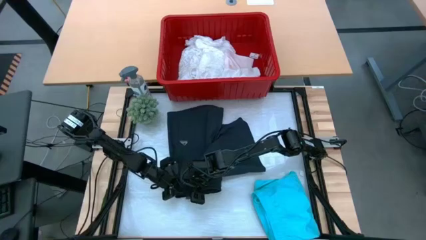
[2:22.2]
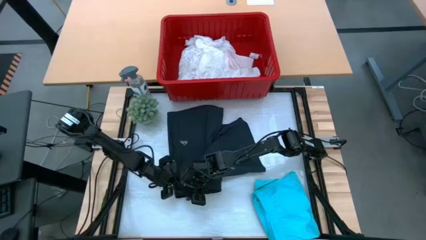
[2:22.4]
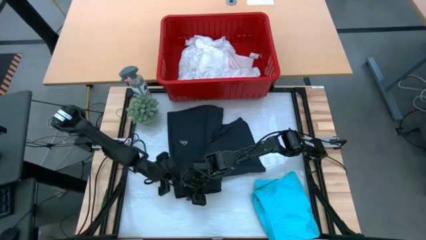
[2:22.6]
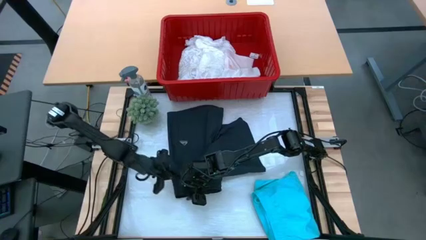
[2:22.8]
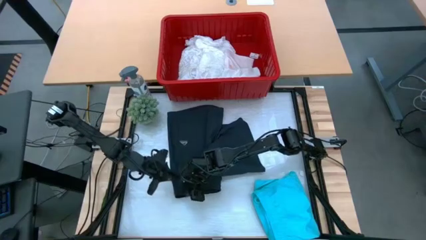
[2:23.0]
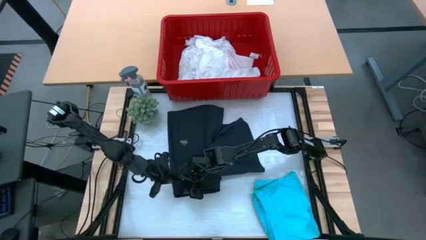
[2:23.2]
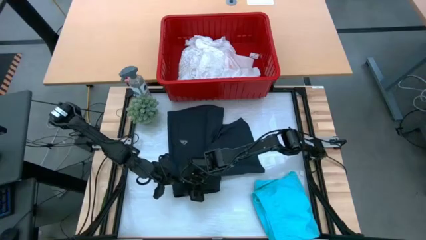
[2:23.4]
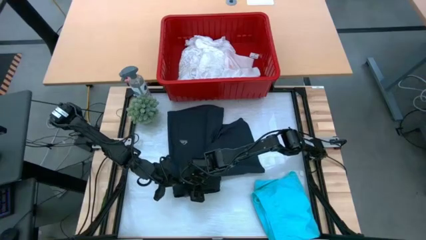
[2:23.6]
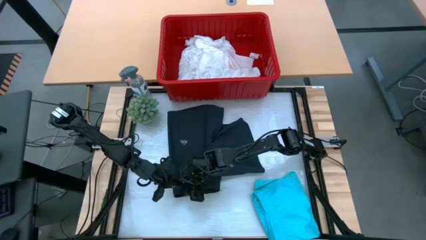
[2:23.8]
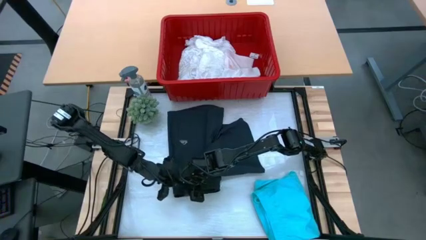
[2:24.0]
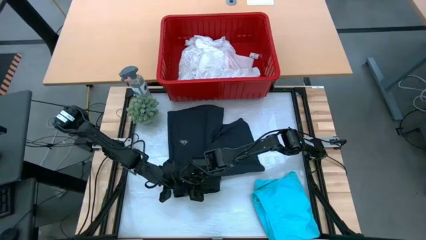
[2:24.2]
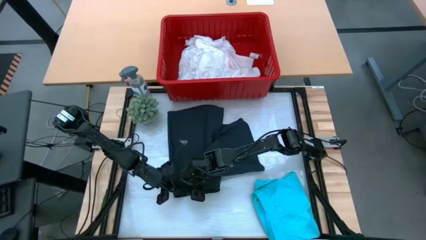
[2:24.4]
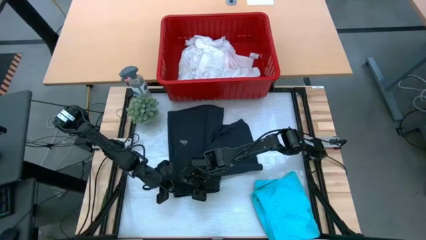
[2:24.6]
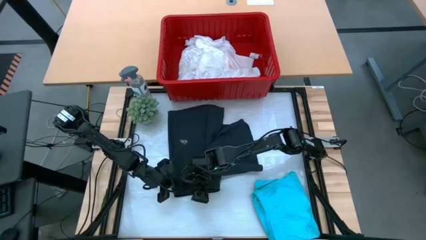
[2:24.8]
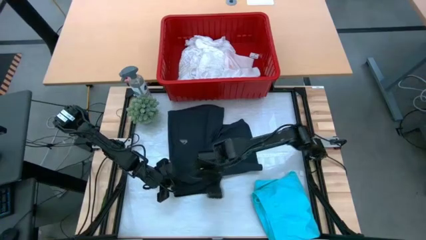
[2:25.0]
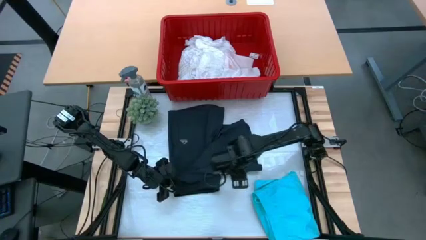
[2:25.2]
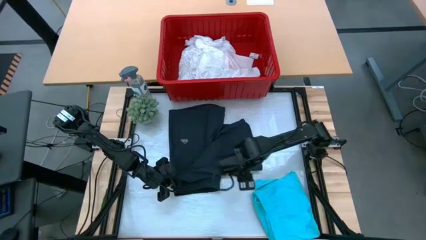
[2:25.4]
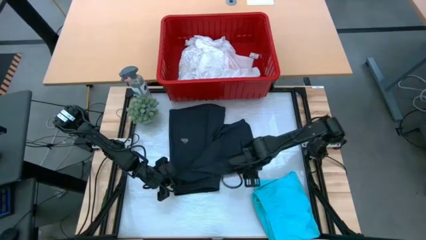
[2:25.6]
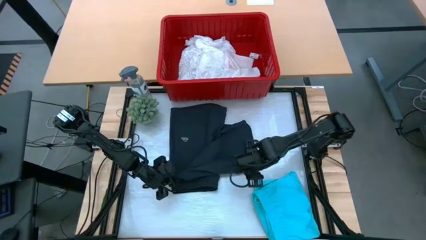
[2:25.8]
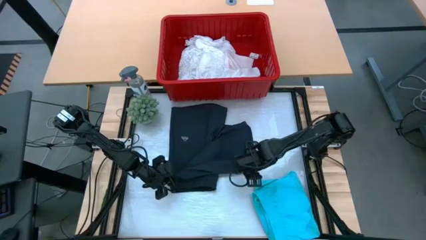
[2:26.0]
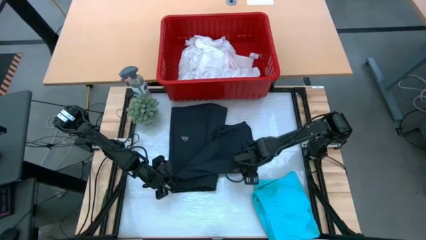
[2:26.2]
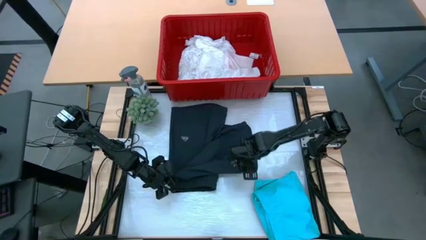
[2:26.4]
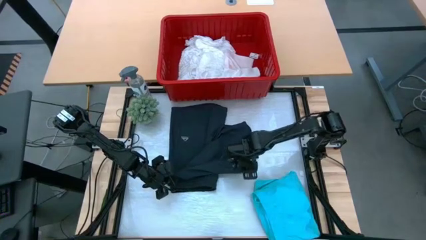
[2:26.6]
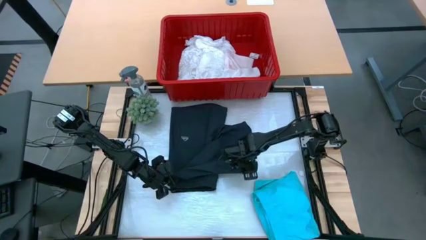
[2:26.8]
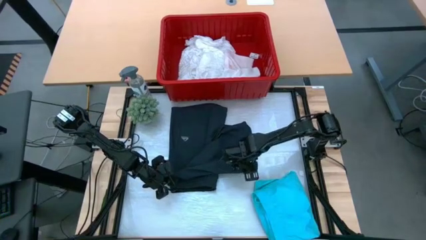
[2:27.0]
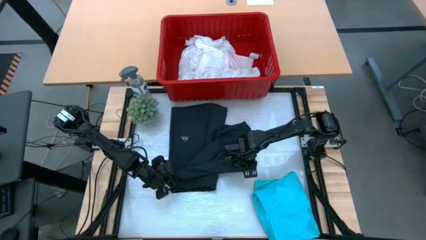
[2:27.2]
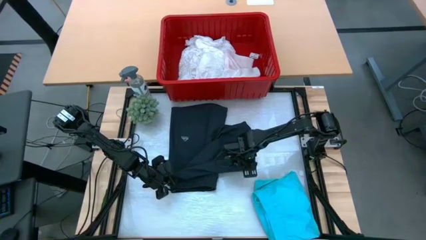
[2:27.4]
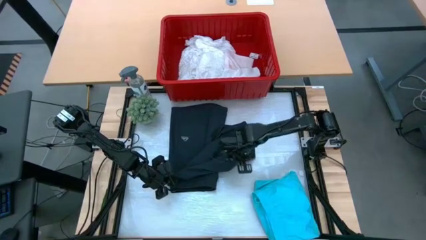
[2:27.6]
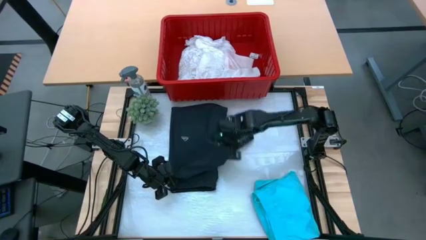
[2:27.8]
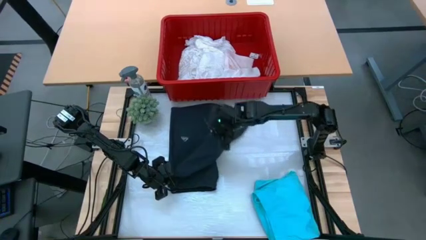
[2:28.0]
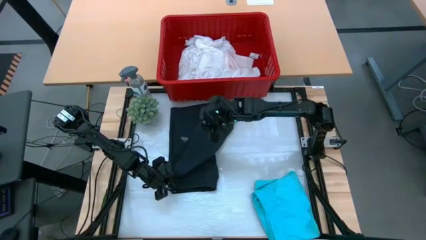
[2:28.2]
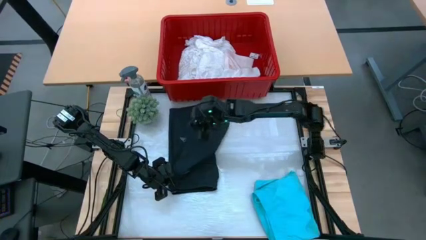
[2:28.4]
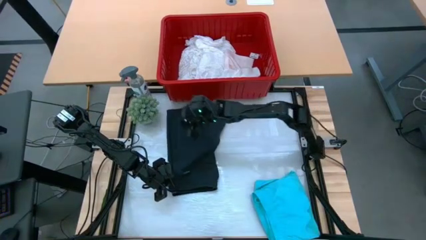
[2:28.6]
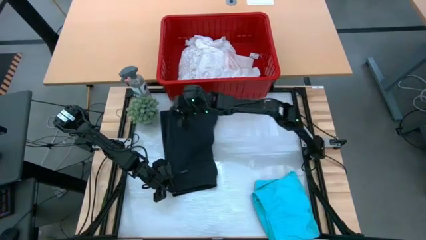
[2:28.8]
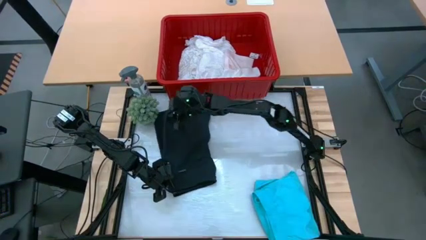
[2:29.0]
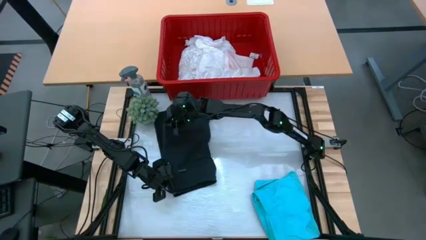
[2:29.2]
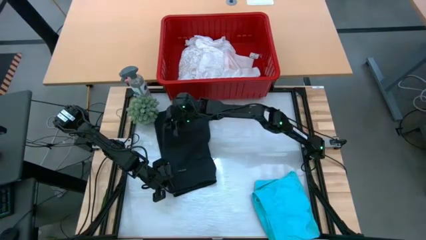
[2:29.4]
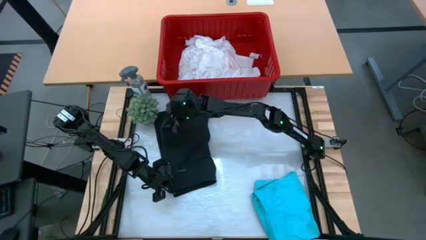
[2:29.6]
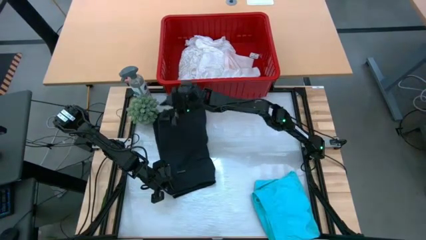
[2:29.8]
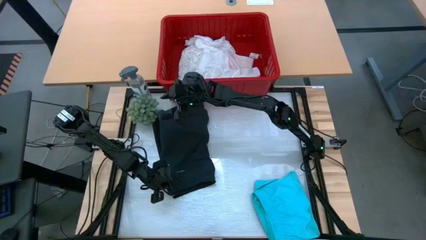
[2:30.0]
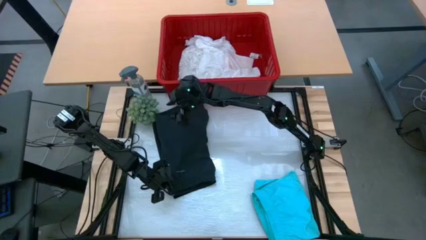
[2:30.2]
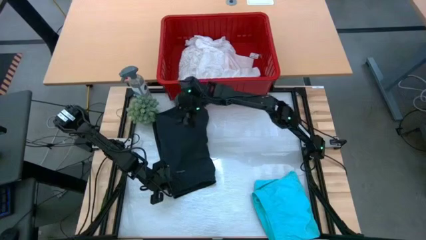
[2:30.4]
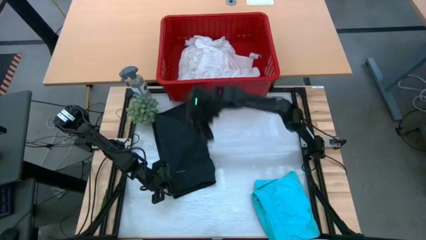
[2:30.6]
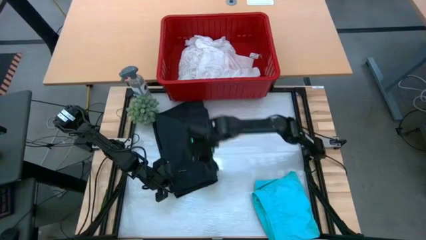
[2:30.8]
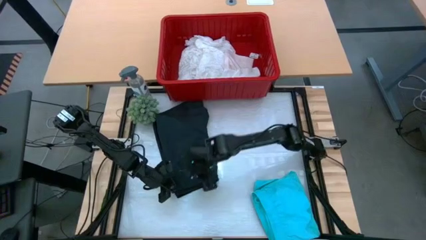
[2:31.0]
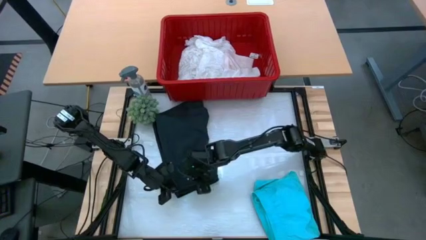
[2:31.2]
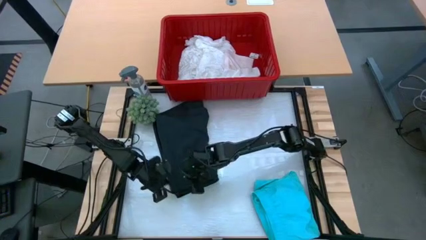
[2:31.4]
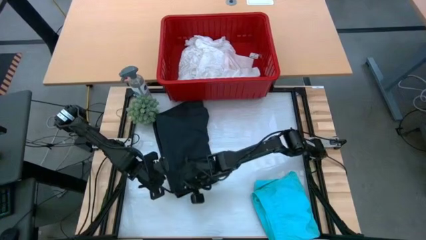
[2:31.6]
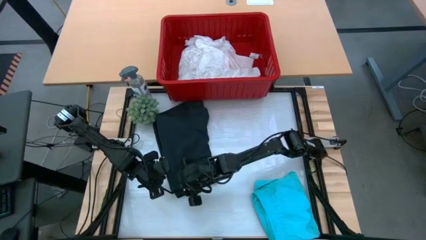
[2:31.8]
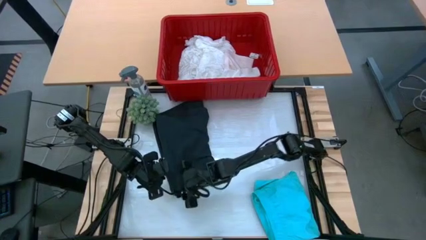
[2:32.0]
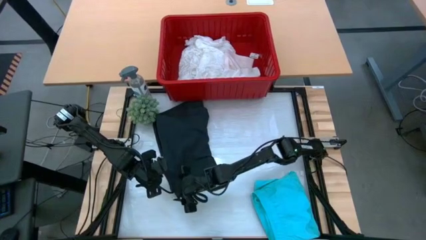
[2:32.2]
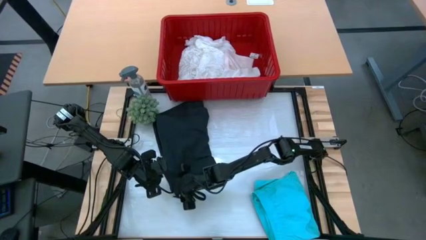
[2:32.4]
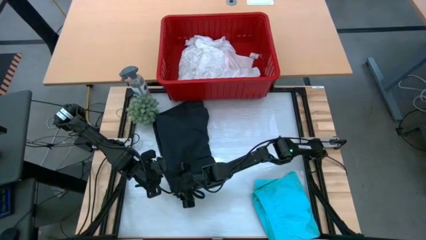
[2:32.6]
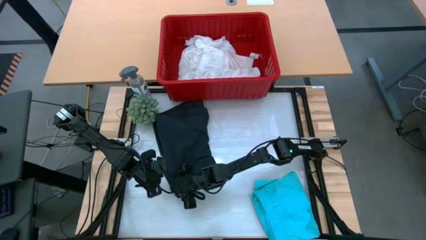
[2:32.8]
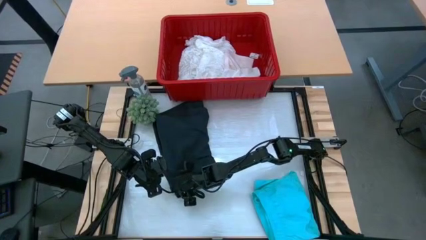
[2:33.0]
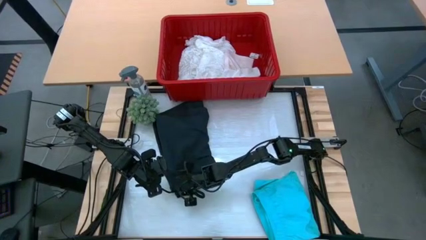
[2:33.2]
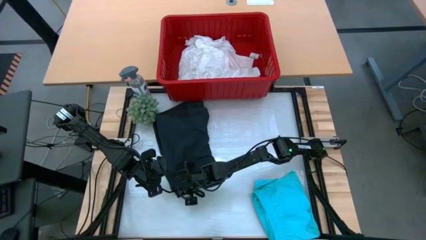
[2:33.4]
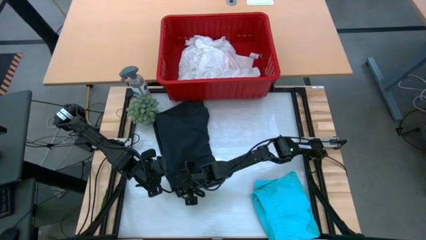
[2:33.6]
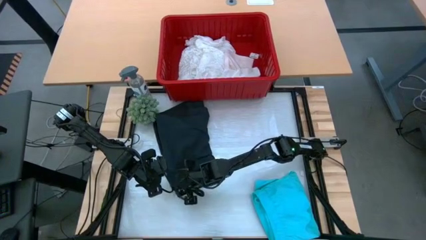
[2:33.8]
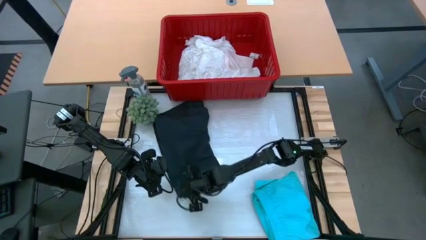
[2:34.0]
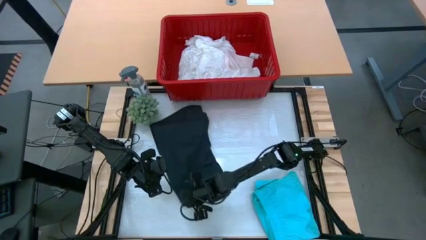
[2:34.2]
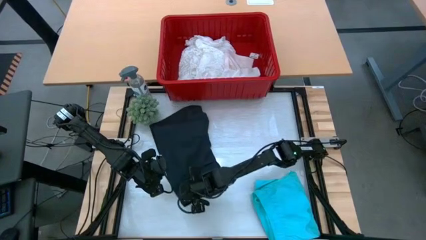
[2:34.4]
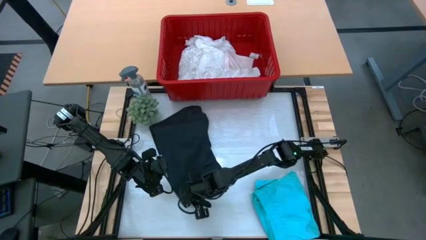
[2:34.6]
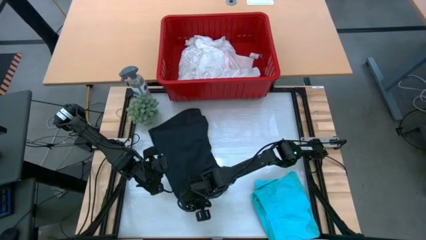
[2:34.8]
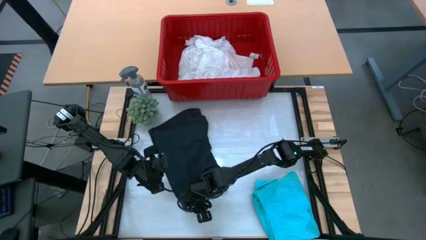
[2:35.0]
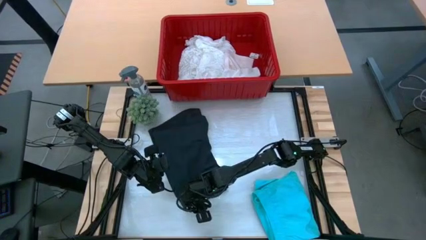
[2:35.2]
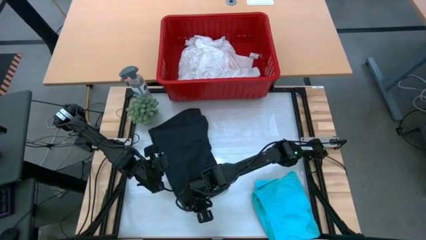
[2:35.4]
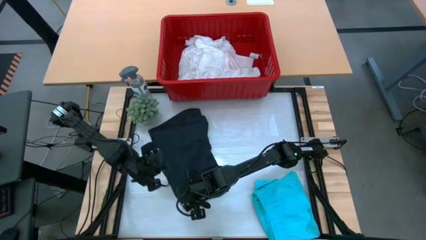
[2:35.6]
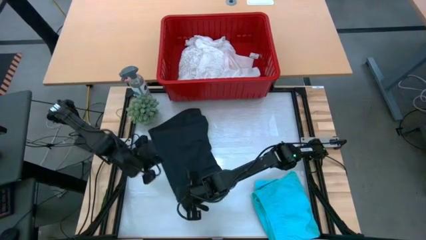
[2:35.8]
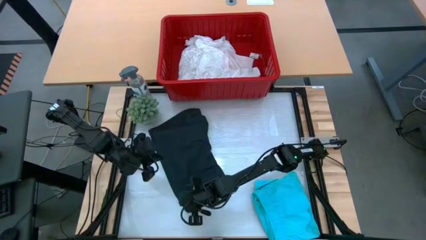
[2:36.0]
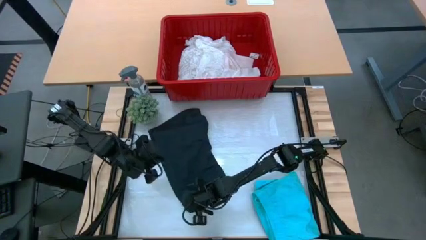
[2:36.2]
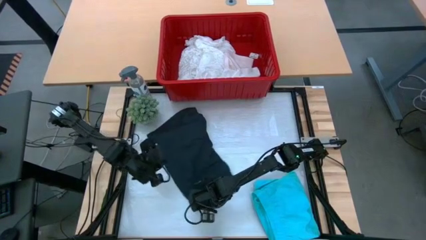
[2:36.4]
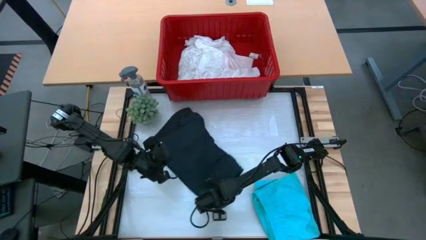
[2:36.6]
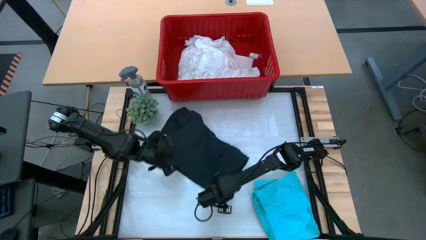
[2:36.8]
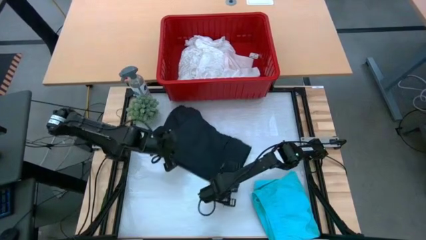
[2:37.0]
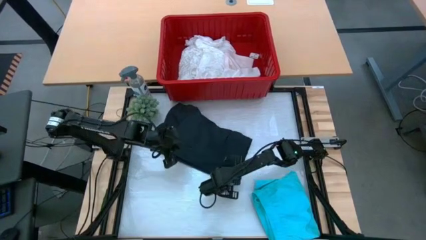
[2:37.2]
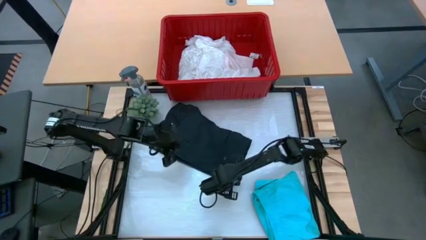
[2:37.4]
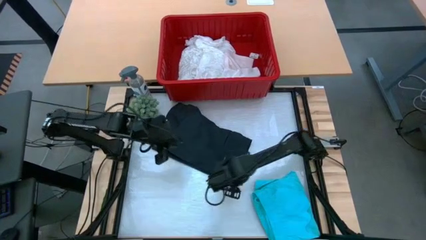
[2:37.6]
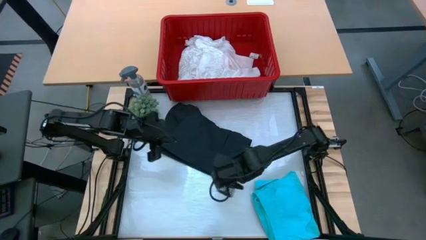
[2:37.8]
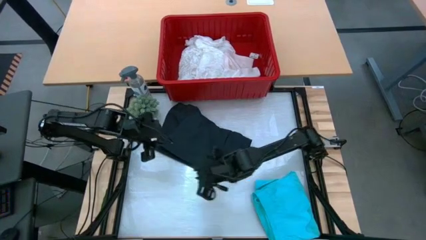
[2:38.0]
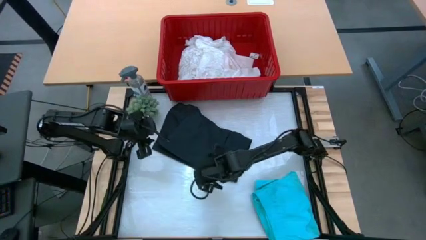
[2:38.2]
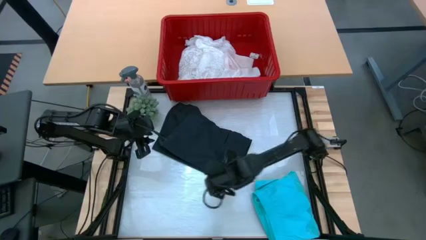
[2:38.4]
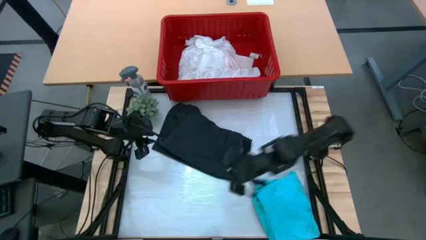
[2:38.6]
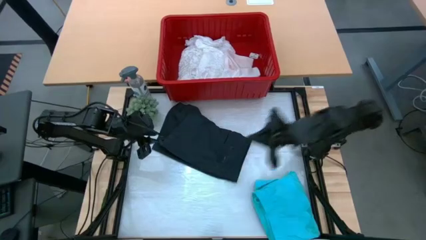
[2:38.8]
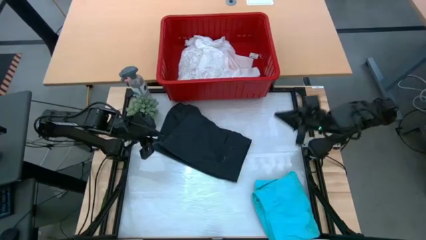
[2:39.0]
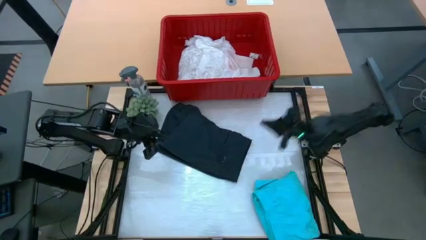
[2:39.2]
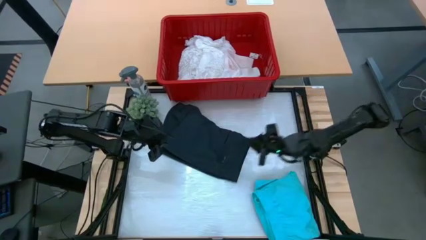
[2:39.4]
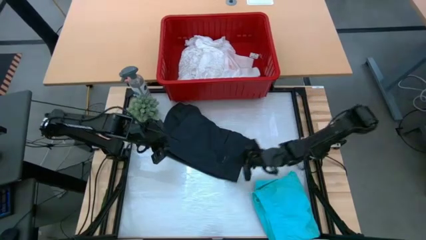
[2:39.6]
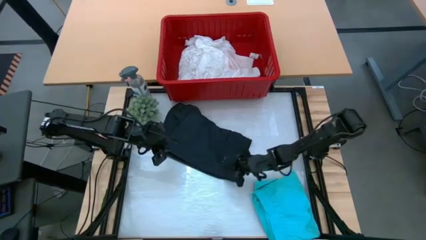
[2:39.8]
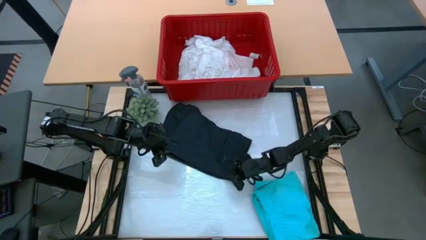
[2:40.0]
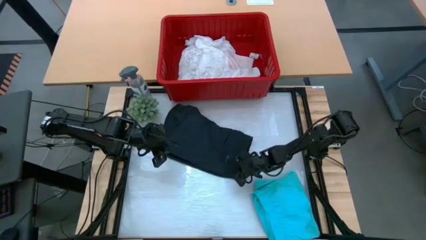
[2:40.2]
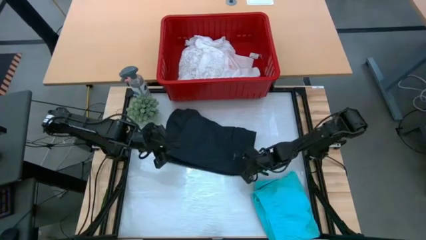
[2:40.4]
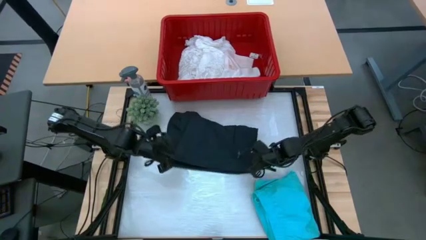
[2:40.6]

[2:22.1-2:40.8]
Task: Fold Laundry from Bin
Fold the black shorts
